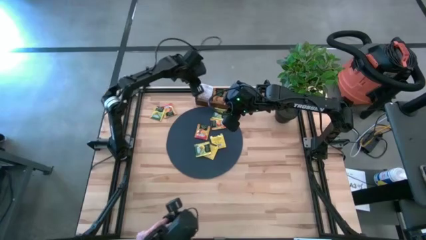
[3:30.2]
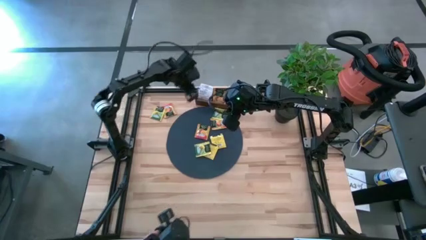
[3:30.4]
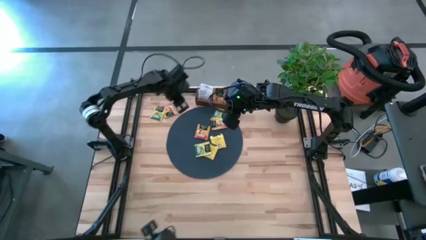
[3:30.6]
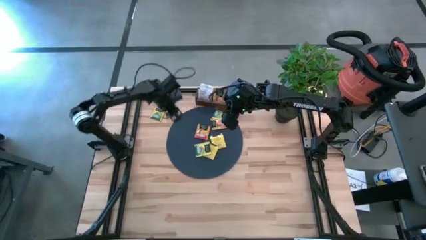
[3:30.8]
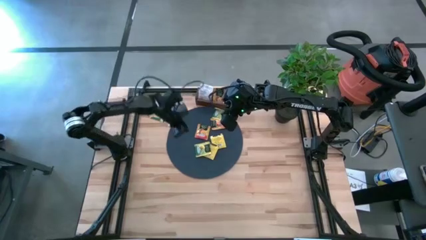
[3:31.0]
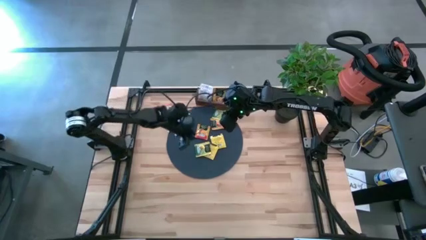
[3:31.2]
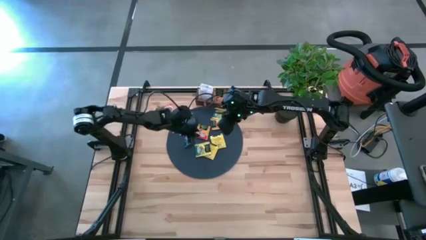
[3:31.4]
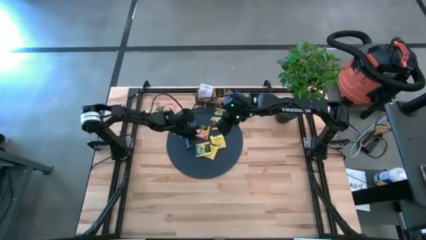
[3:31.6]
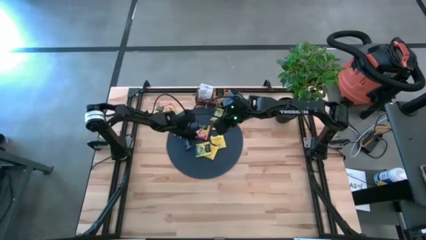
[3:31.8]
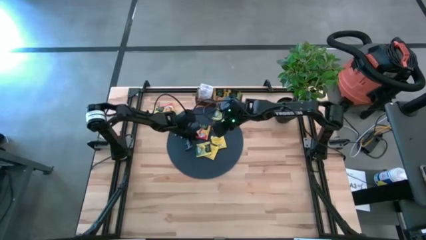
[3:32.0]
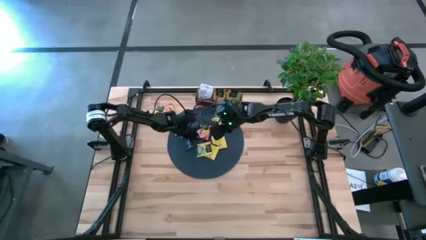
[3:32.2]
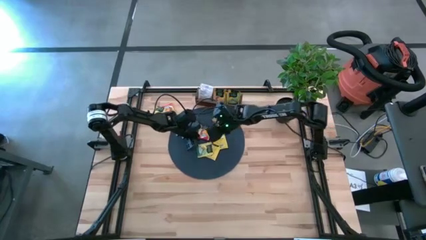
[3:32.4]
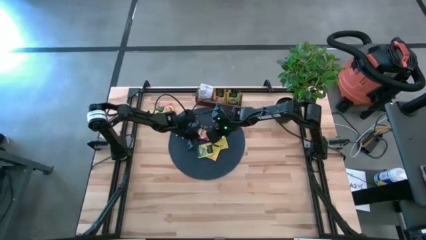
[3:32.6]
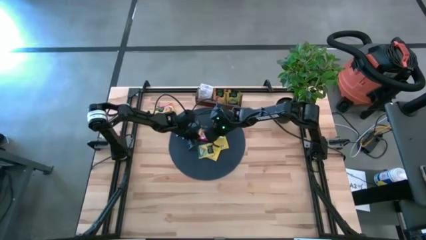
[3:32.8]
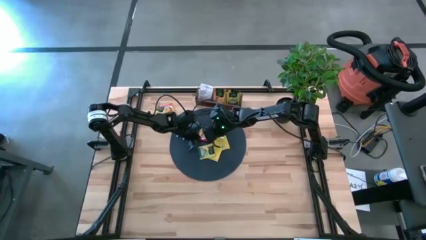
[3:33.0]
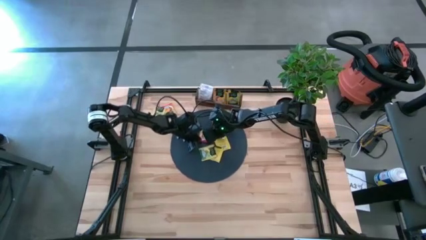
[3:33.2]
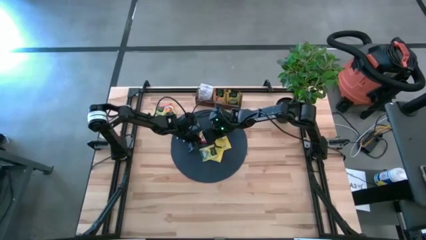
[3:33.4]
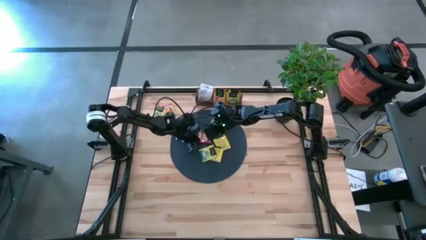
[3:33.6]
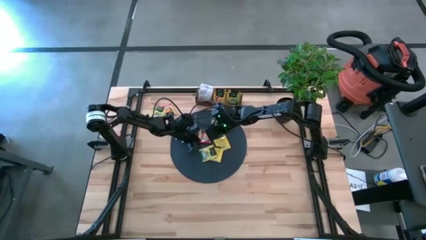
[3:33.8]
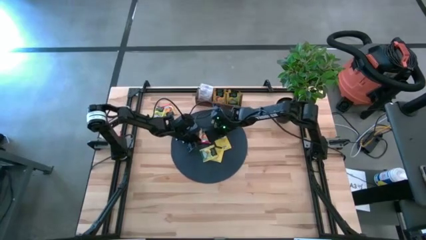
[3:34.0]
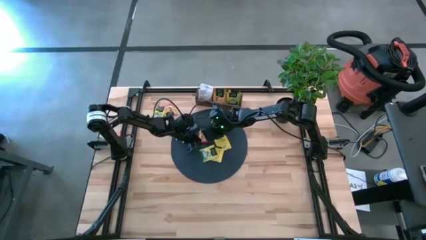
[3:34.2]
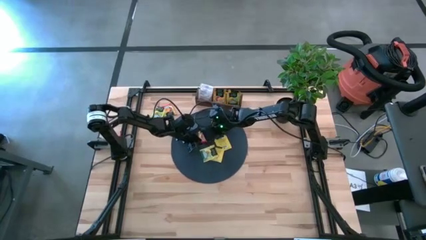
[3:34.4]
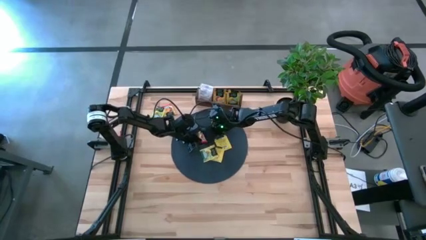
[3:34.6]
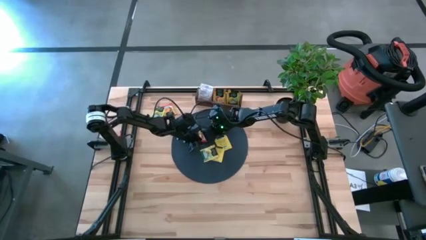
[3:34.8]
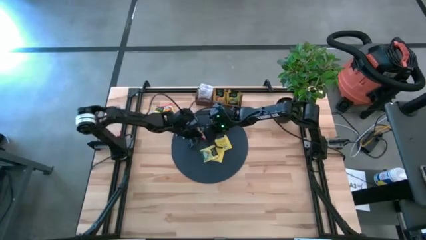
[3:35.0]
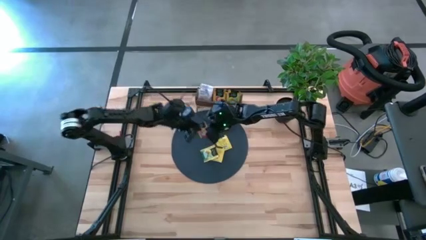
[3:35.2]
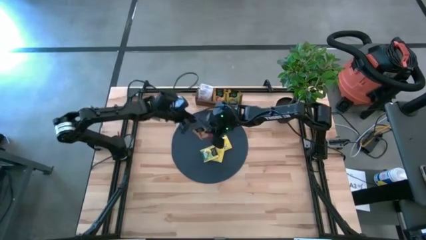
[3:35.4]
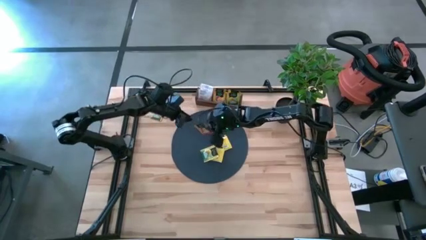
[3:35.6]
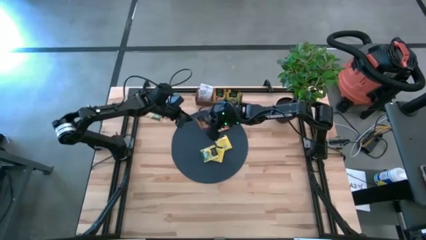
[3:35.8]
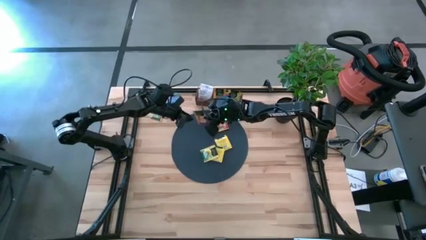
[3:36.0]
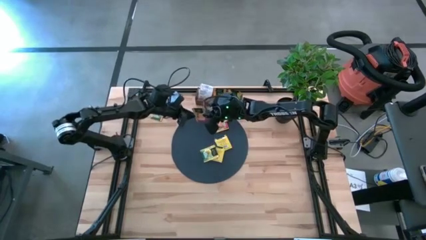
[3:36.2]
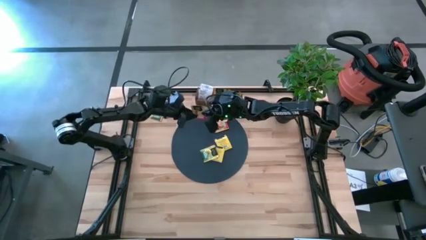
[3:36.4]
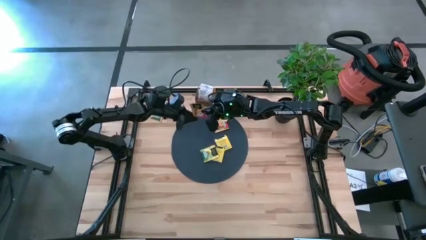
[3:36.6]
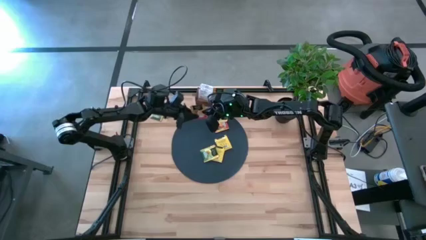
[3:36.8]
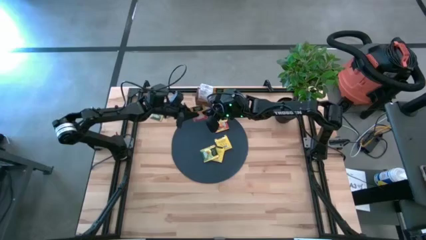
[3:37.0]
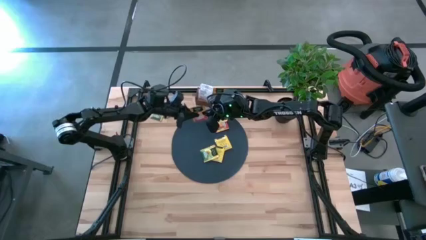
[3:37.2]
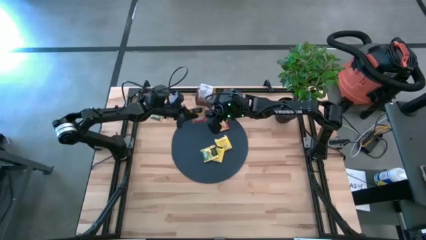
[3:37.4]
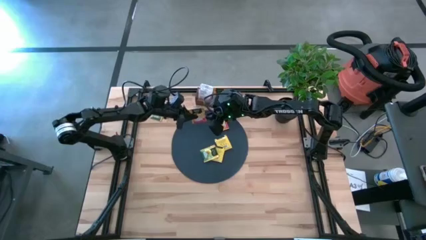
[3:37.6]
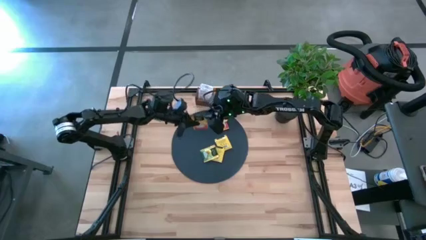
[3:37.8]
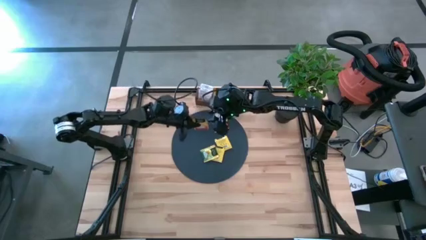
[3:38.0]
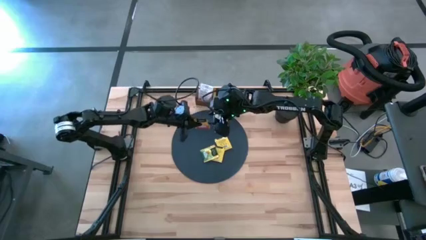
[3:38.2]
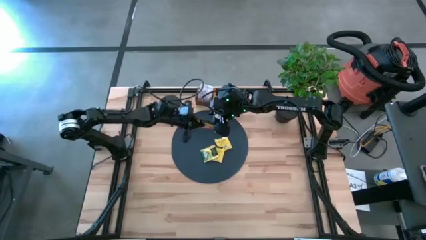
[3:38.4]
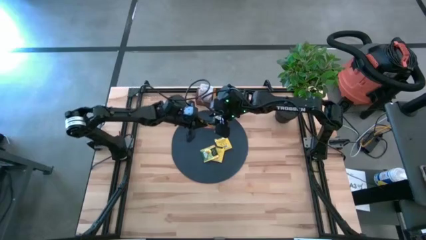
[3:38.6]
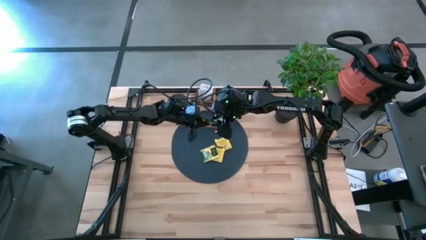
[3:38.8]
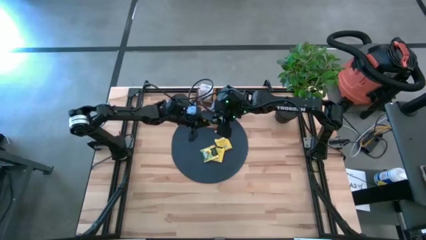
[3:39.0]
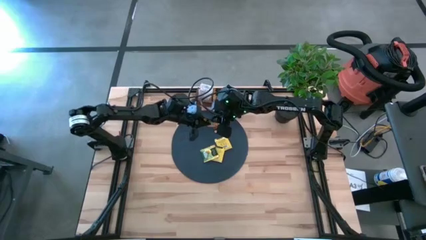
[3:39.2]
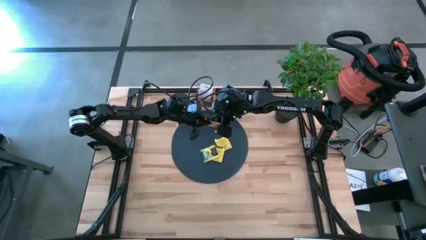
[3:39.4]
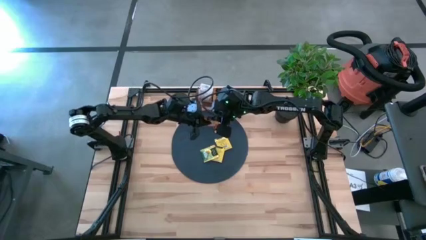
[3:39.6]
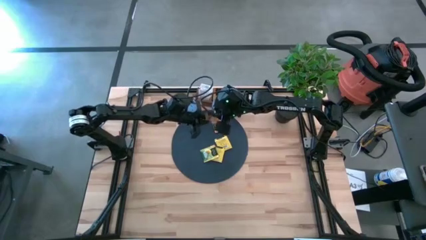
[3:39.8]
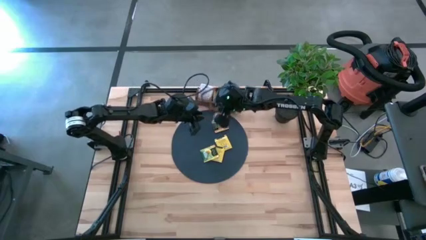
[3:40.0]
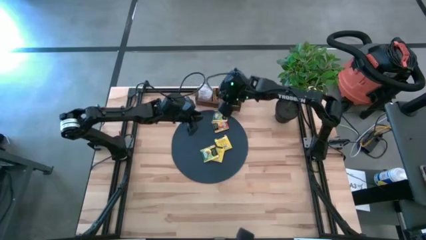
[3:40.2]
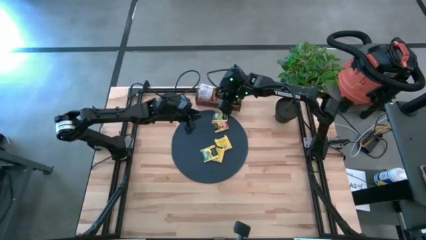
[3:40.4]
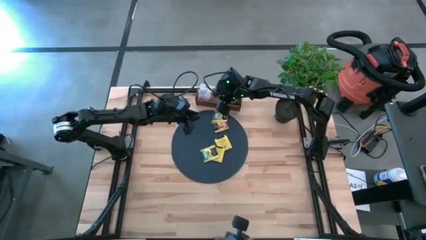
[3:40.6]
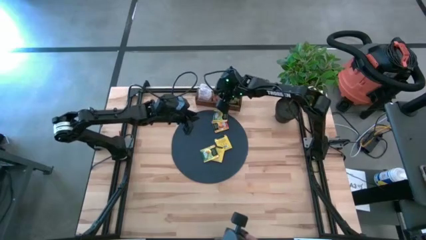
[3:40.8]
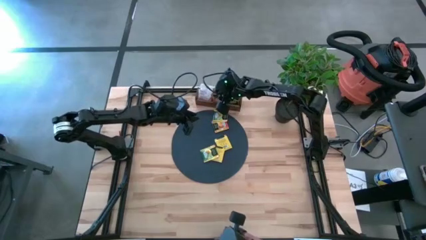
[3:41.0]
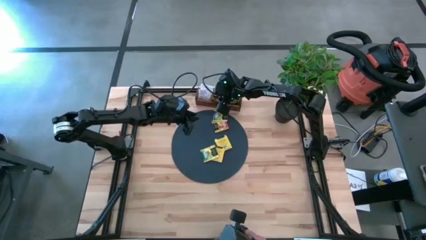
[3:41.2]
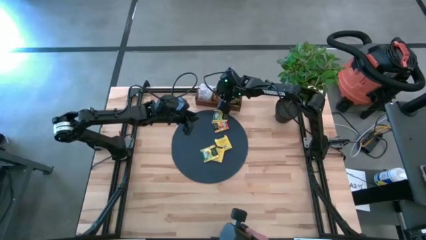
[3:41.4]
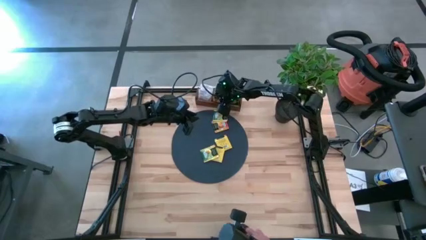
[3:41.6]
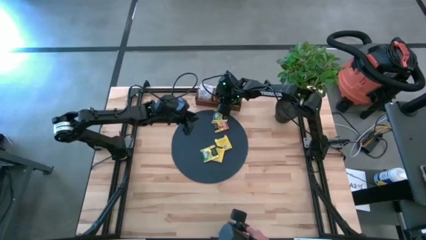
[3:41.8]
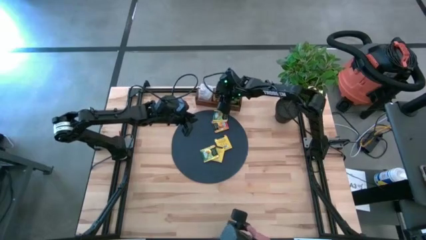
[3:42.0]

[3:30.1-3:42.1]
Task: Pick & Place Tea
Put the yellow tea bag into the middle section of the wooden organizer

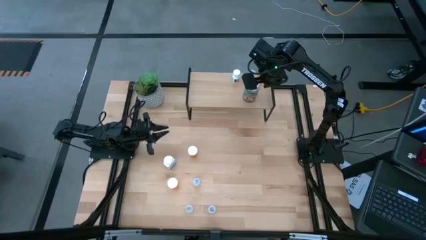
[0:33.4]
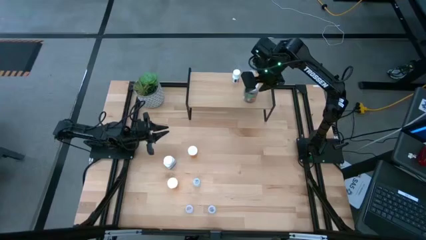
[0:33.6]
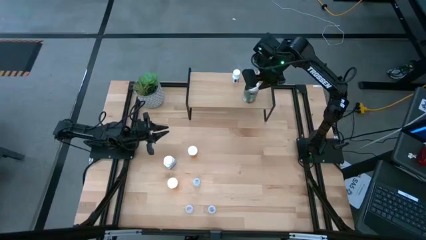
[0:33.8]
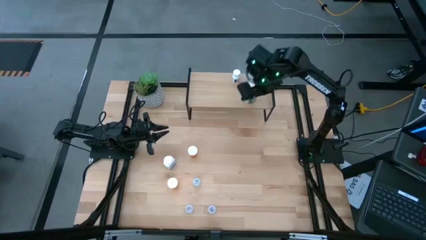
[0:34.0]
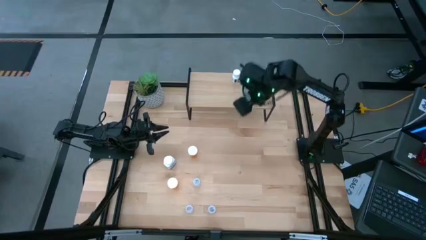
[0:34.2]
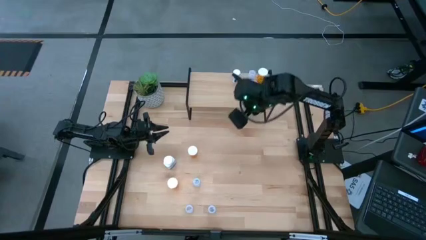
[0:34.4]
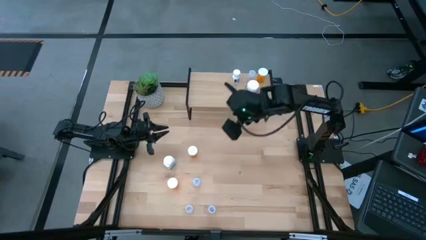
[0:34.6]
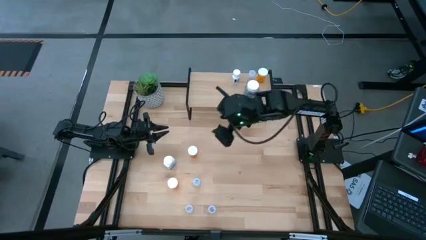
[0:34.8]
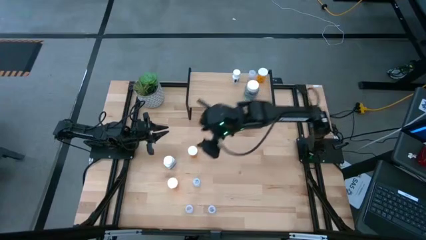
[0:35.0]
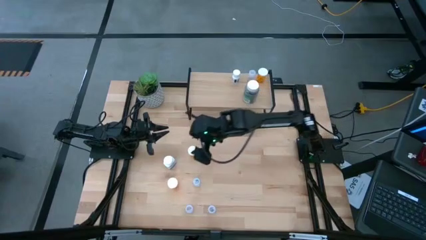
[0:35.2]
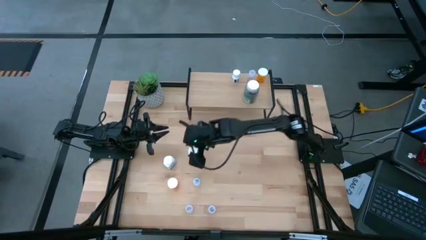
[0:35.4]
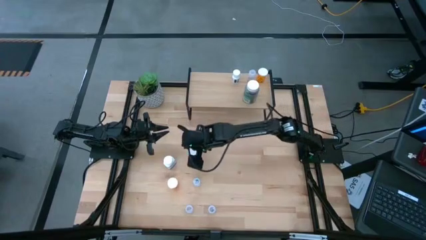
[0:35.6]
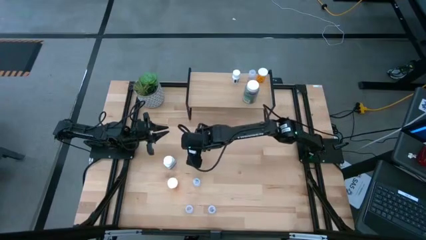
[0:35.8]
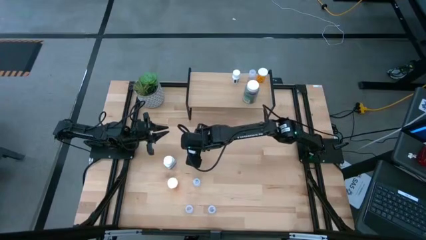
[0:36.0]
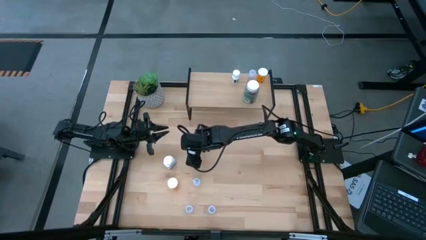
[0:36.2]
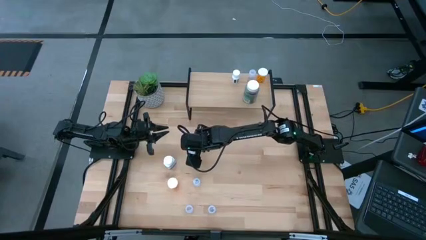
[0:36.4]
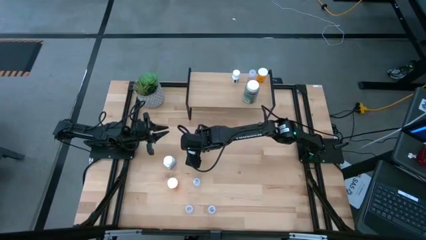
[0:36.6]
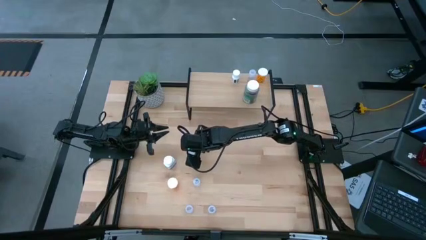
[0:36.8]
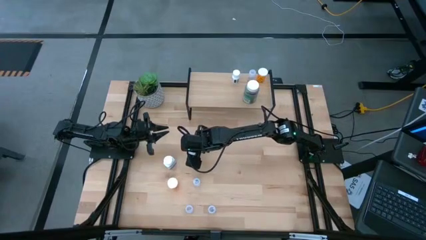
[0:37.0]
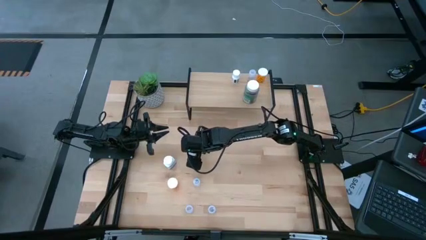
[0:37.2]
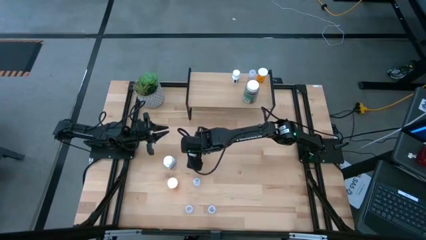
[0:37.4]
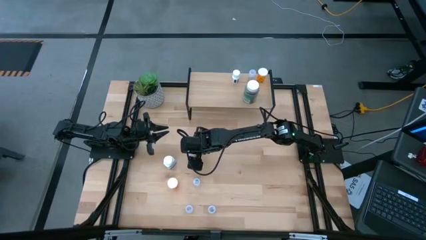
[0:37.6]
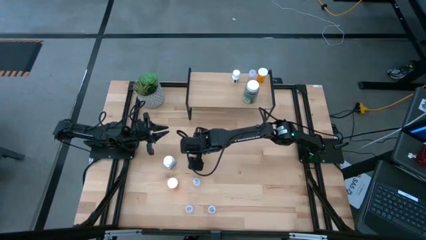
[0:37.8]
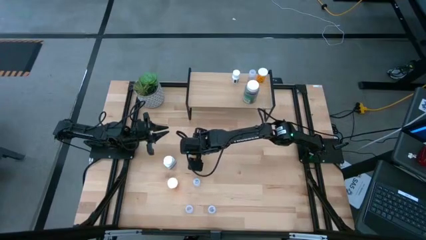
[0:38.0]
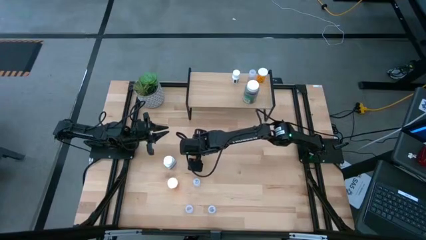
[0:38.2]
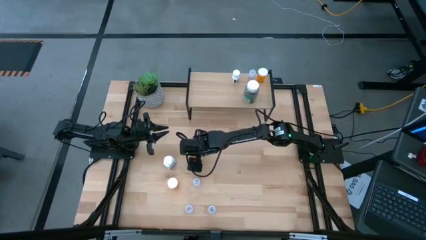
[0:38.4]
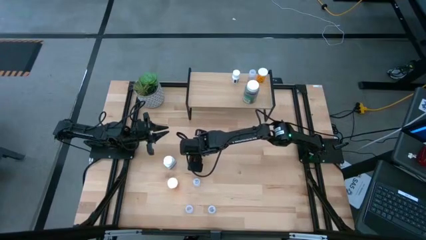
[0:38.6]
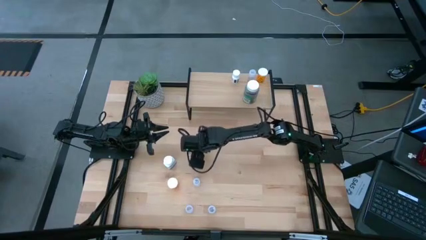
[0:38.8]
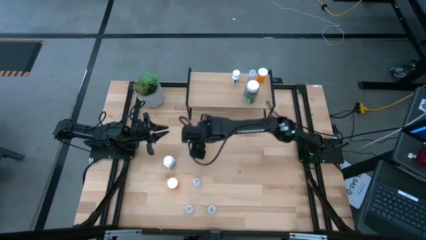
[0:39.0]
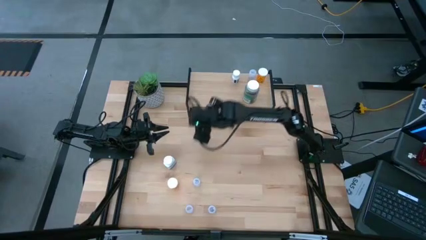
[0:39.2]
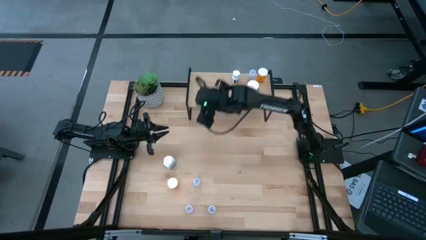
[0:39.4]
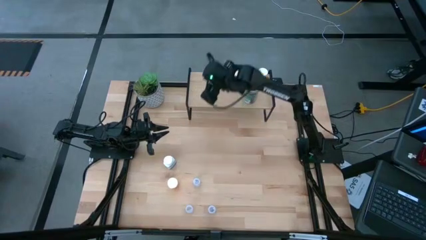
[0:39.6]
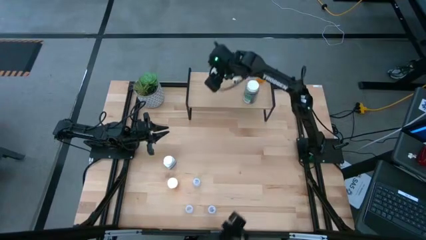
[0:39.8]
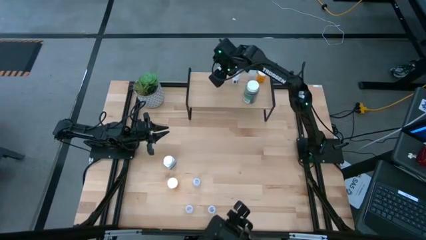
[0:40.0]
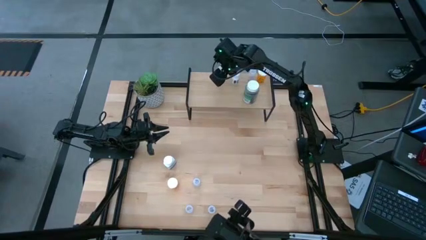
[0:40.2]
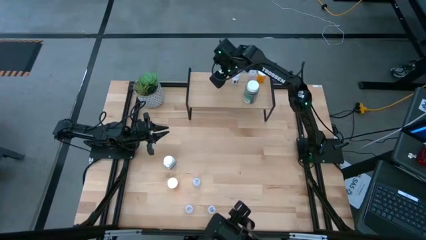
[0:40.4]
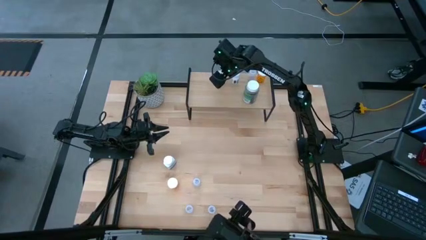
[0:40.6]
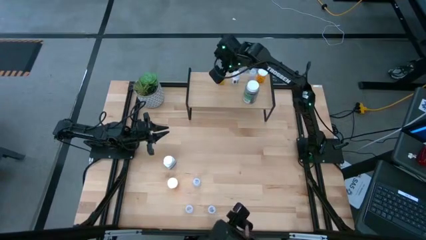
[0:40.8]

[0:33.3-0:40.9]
Task: Pick and place medicine bottles onto shelf by color
Put the orange pill bottle on the shelf
